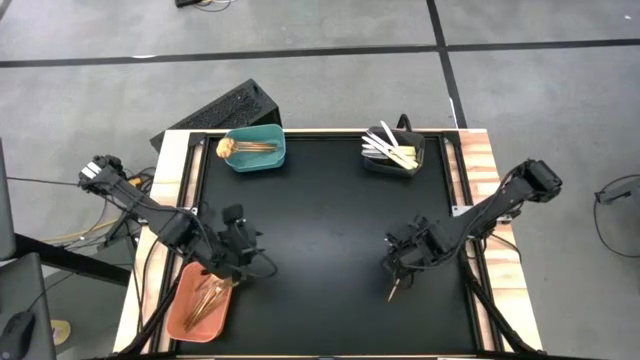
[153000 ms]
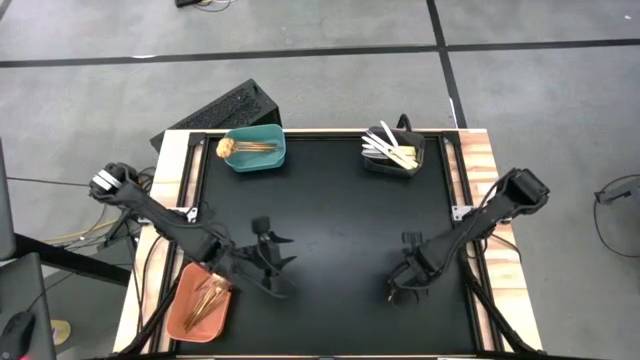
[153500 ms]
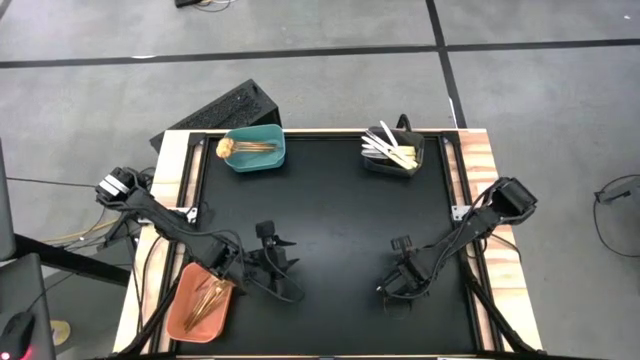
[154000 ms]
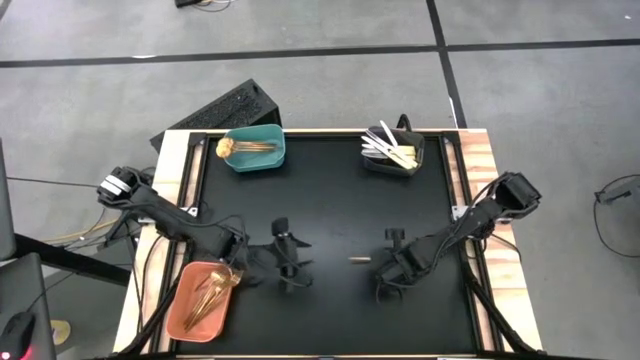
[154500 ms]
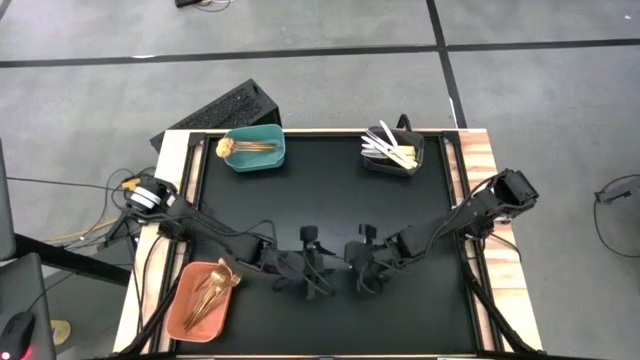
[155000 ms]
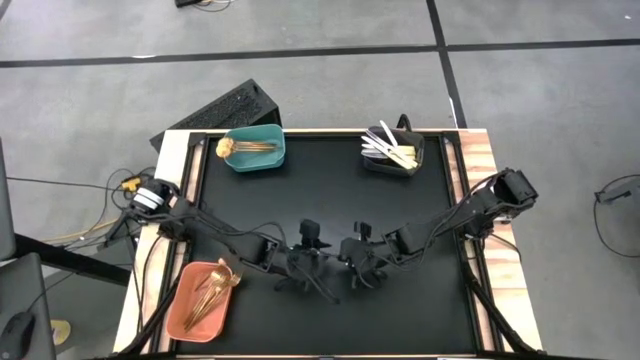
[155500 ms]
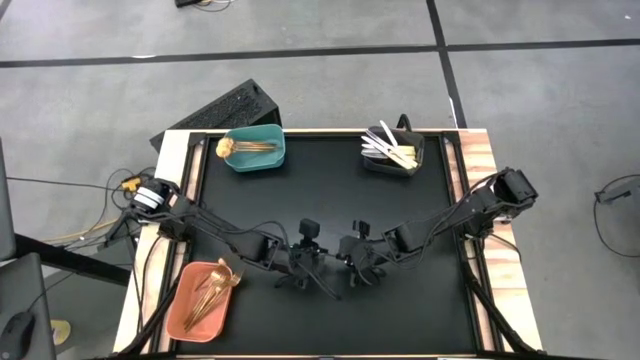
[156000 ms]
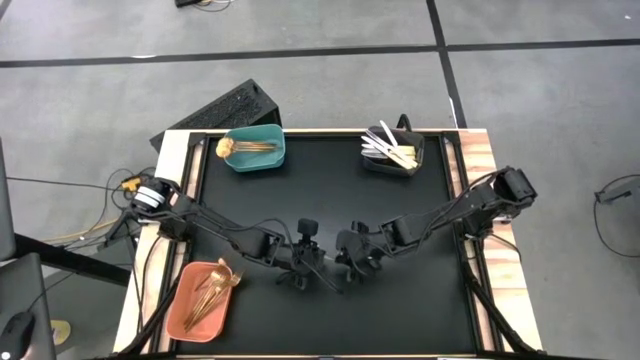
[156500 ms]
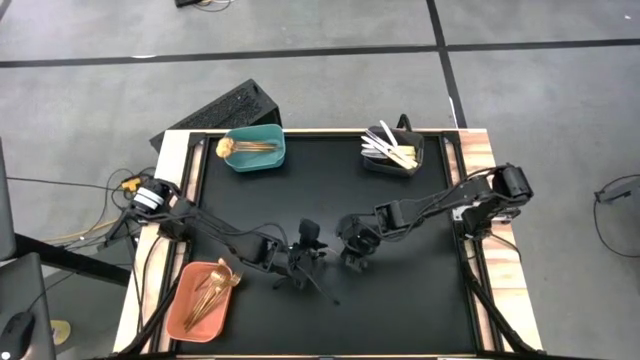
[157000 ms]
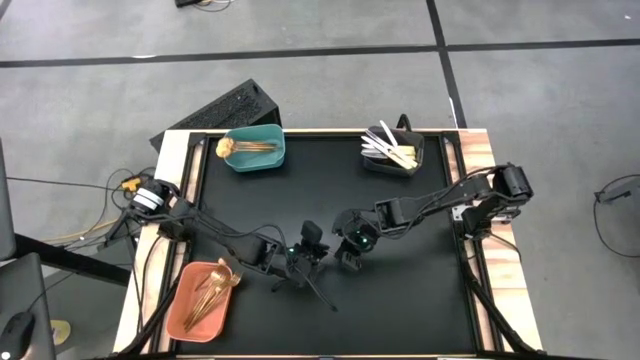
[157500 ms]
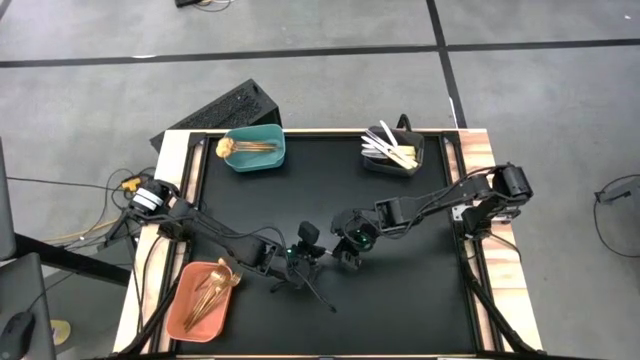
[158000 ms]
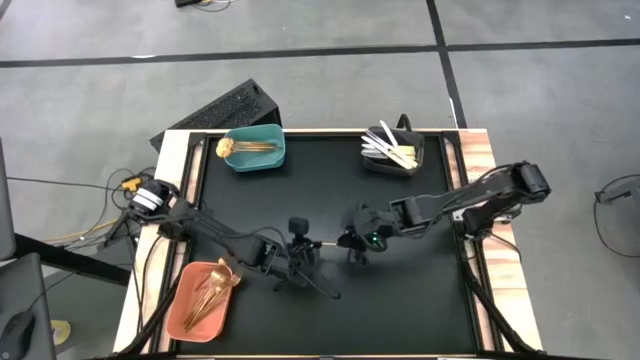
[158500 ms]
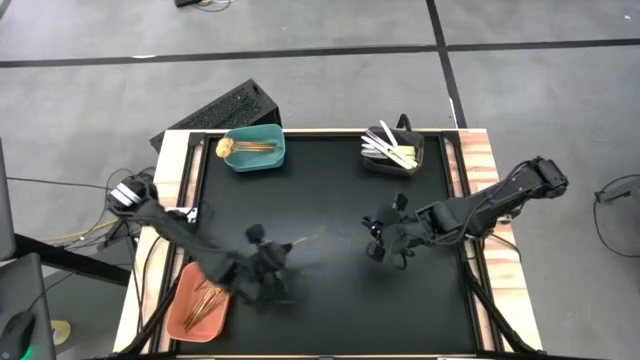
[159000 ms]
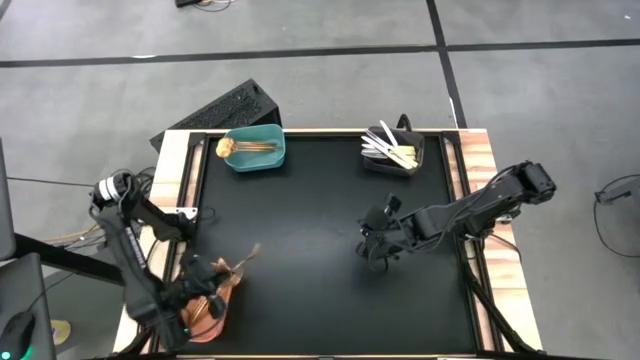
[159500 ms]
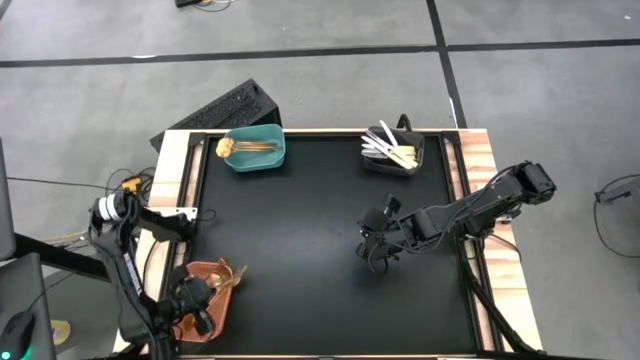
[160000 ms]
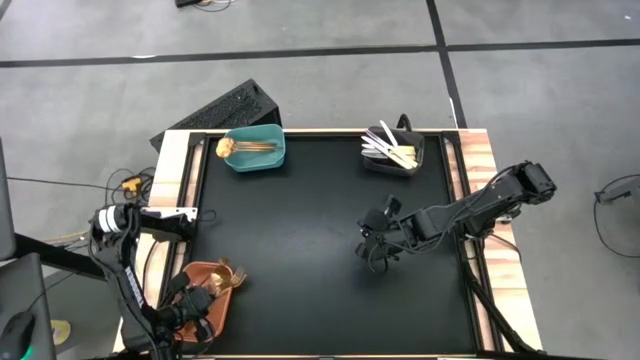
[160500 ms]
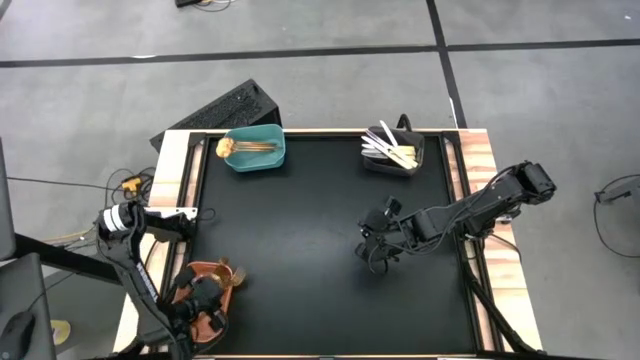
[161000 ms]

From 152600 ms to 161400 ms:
Task: Sort silverware by color (type)
Put the gold fork into the orange bin

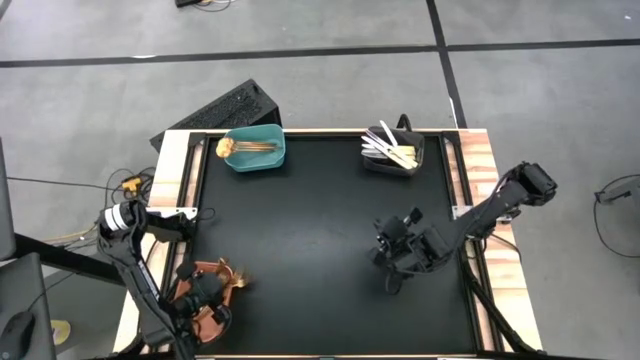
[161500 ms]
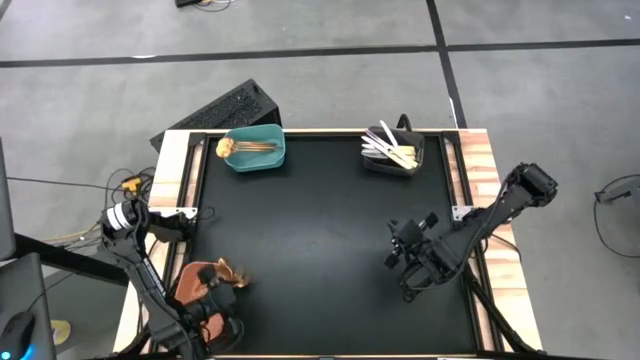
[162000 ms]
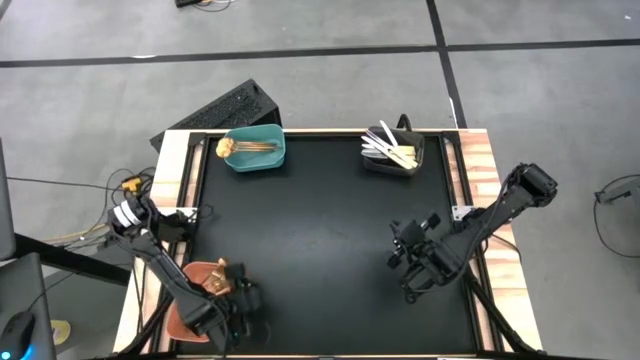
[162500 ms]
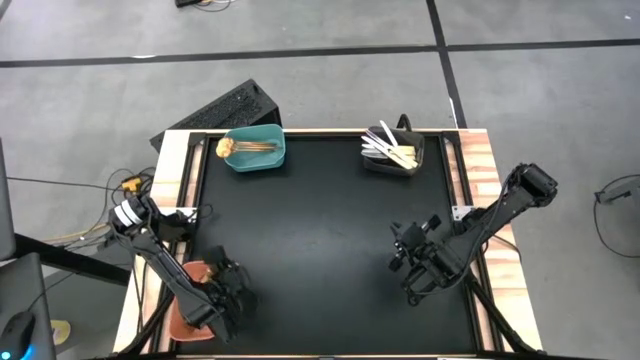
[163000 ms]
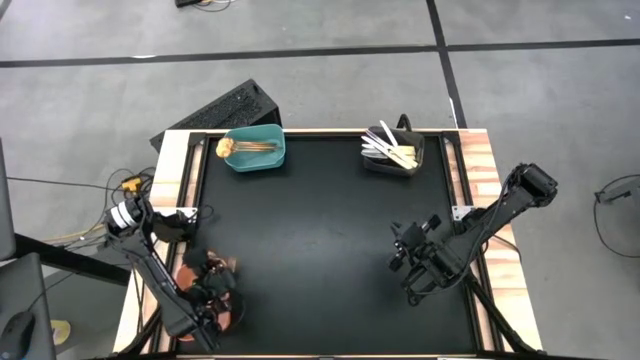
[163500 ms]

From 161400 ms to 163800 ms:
Adjust the gold forks in the orange bin

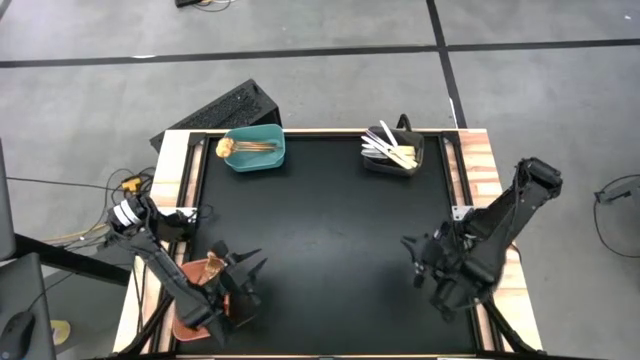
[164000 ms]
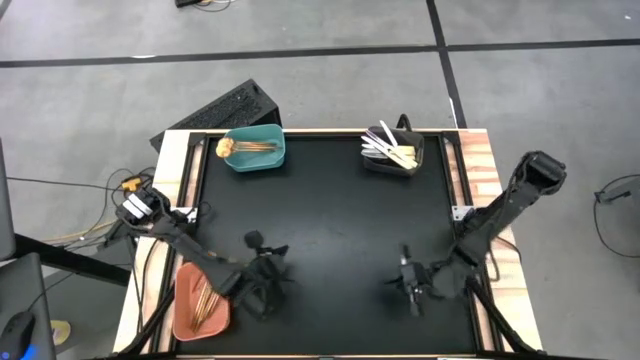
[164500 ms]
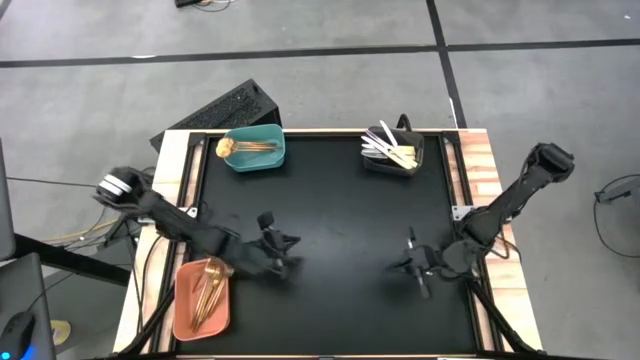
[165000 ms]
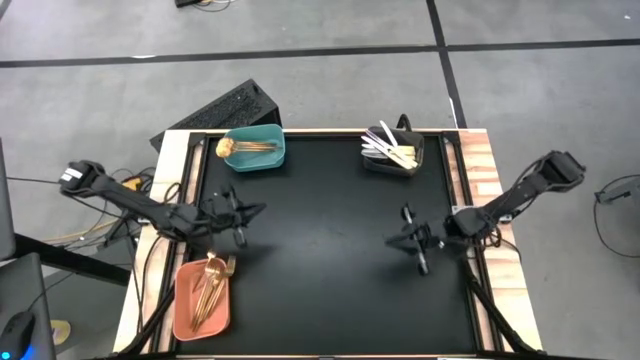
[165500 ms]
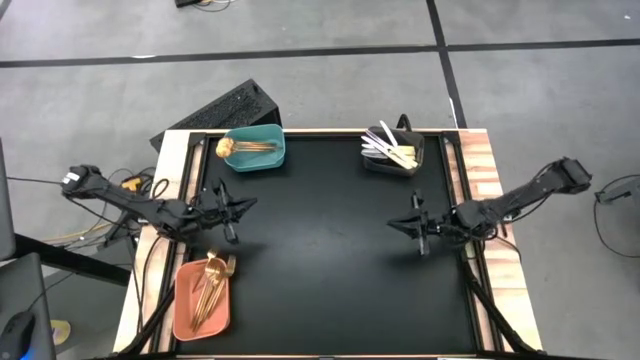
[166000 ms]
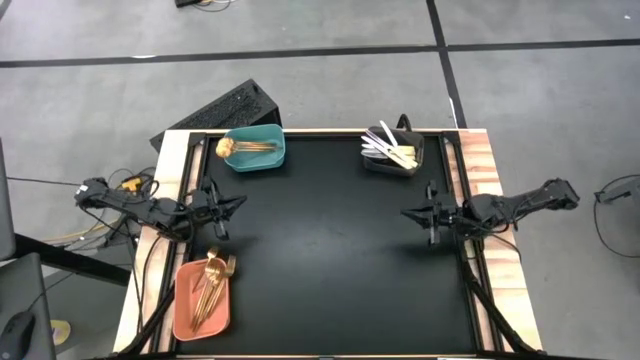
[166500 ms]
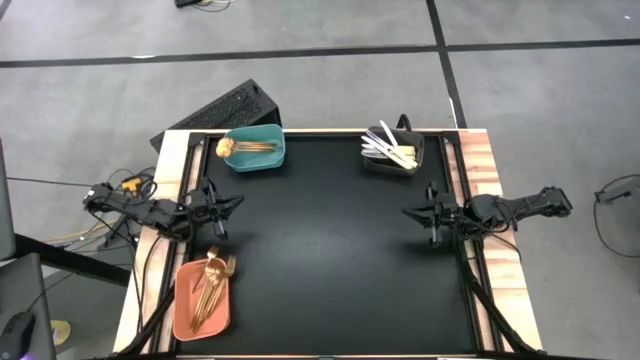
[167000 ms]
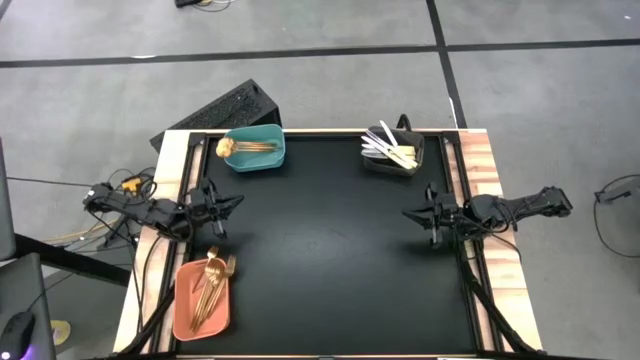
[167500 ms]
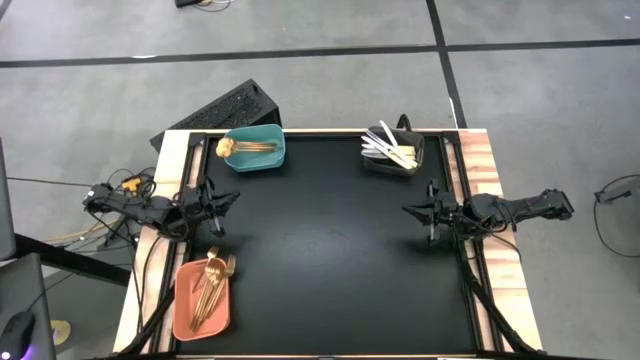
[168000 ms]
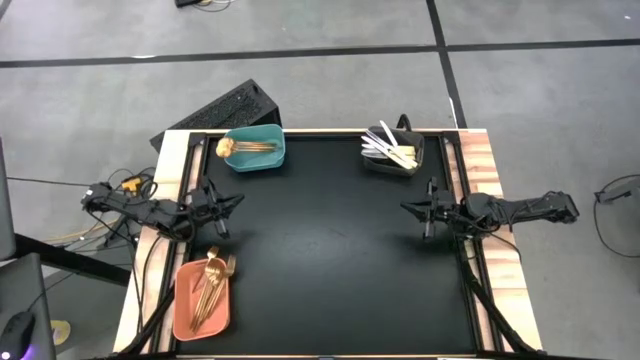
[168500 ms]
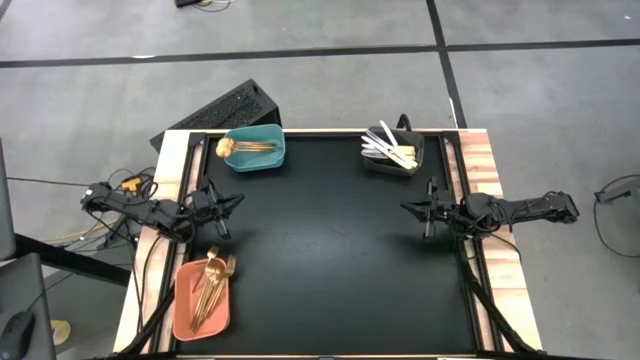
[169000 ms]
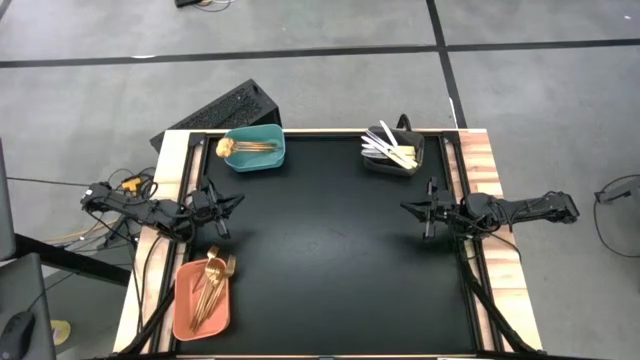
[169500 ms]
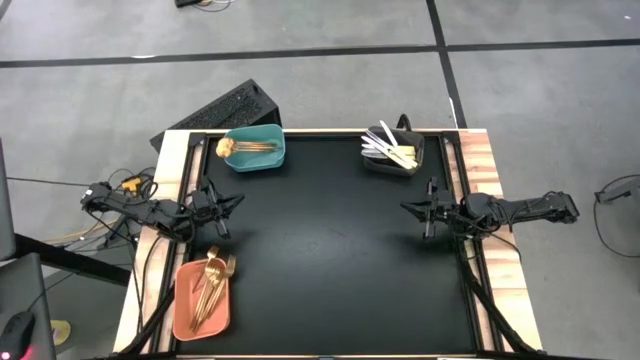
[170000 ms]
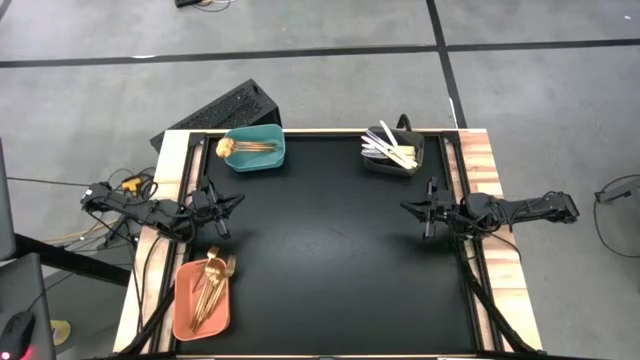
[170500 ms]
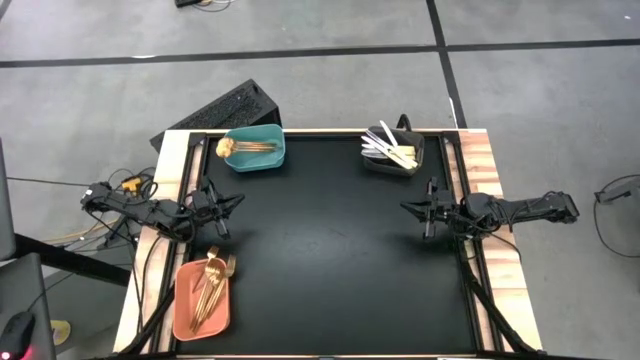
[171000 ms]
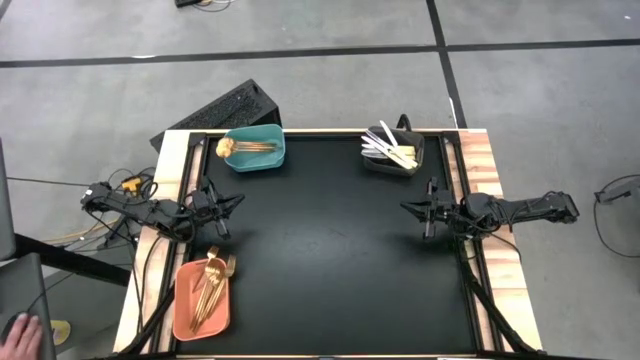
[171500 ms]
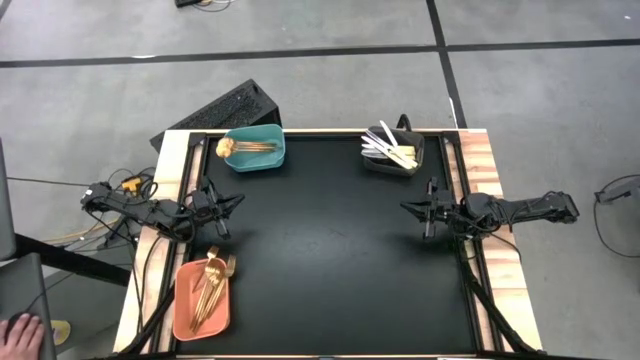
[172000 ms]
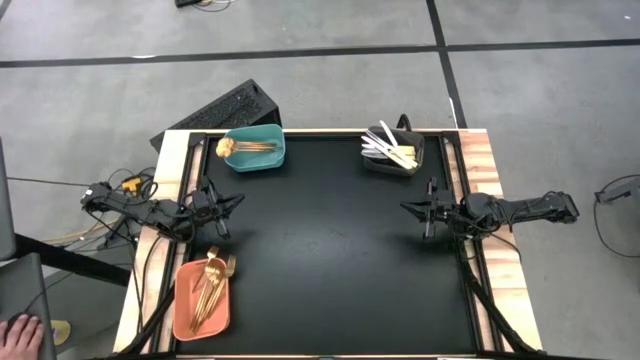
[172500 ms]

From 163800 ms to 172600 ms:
Return to Home Position
